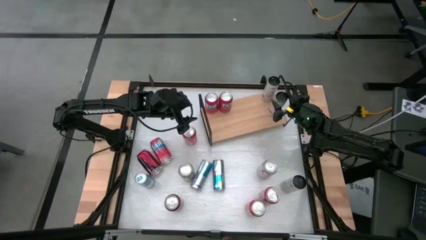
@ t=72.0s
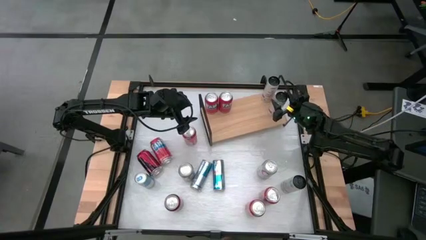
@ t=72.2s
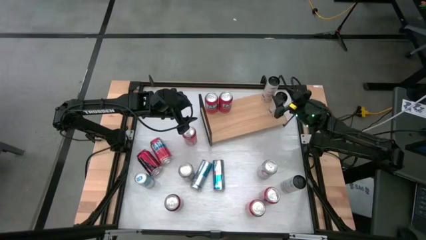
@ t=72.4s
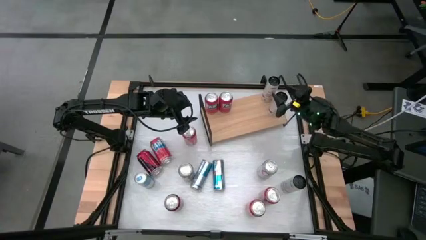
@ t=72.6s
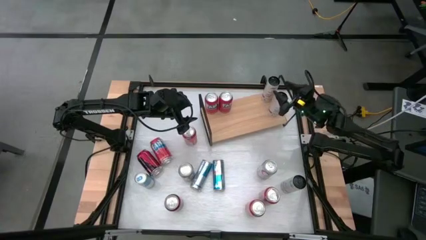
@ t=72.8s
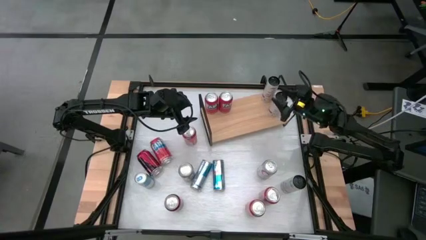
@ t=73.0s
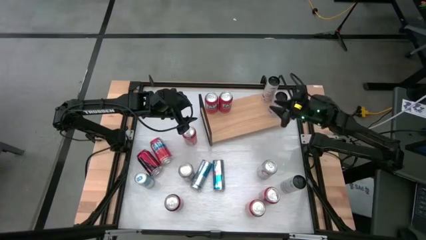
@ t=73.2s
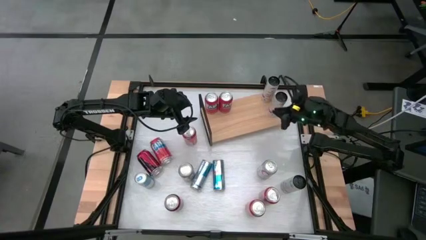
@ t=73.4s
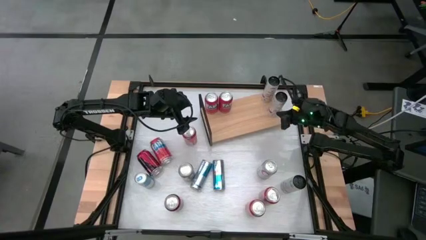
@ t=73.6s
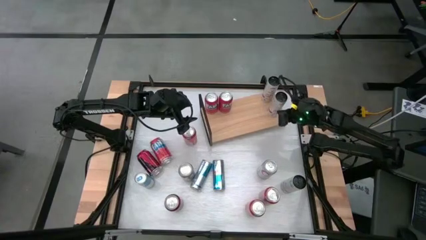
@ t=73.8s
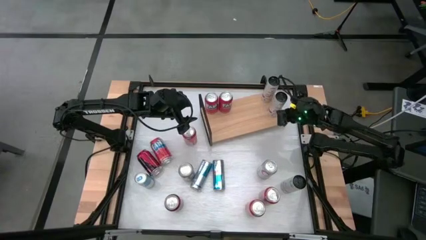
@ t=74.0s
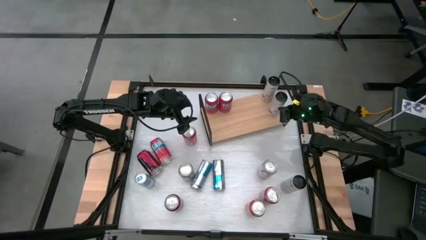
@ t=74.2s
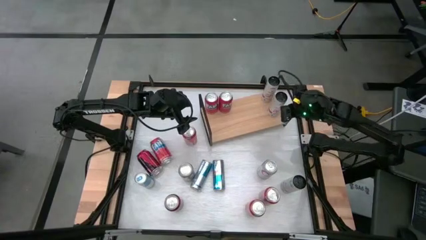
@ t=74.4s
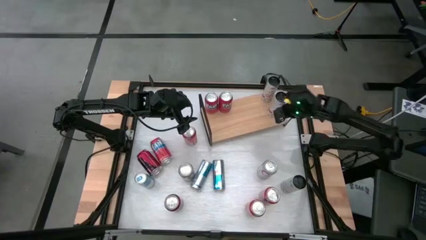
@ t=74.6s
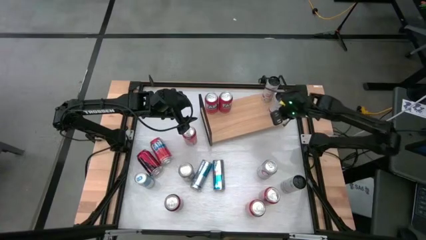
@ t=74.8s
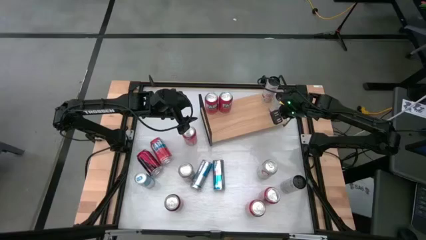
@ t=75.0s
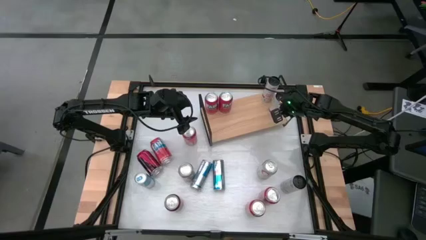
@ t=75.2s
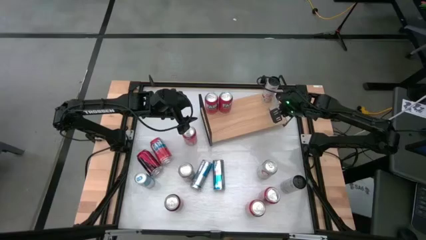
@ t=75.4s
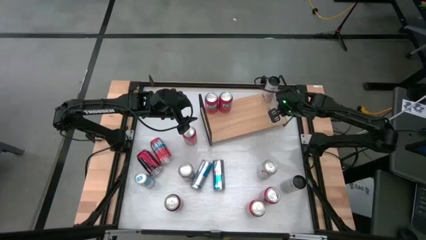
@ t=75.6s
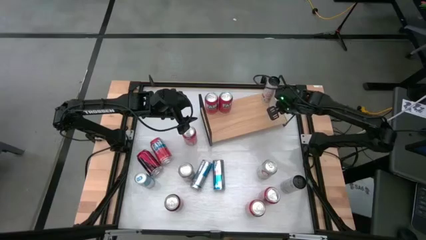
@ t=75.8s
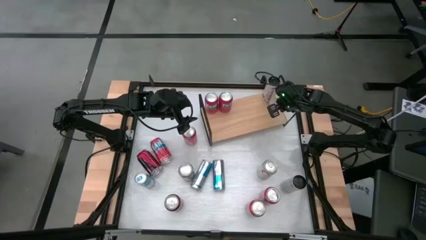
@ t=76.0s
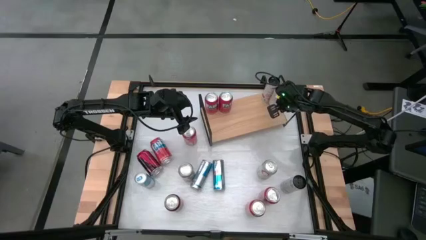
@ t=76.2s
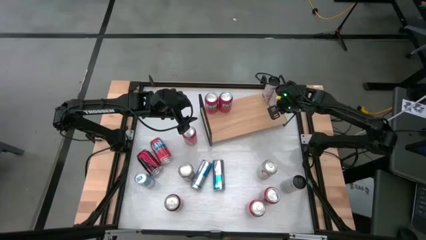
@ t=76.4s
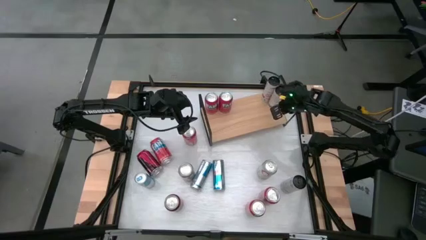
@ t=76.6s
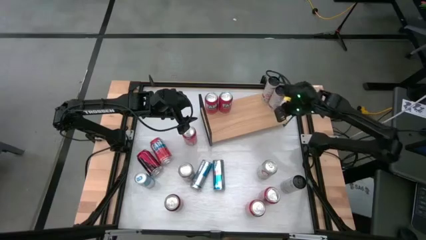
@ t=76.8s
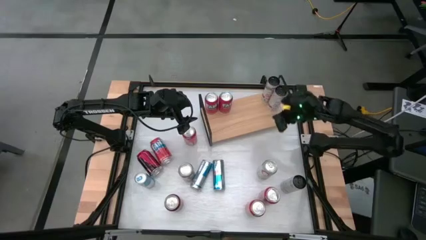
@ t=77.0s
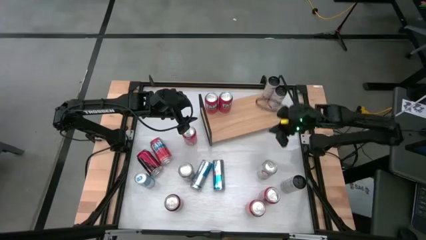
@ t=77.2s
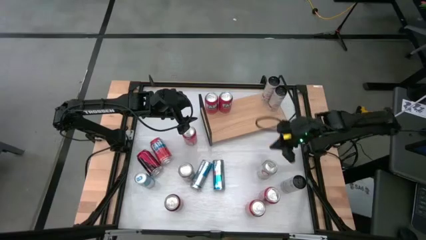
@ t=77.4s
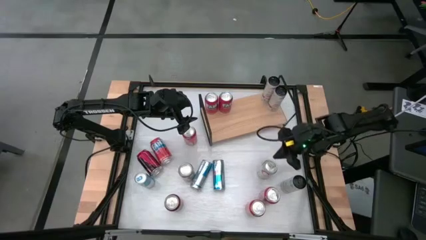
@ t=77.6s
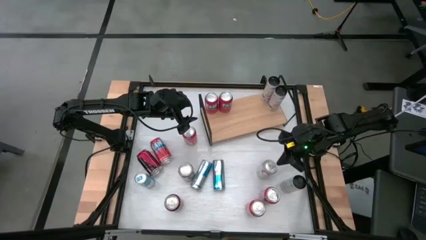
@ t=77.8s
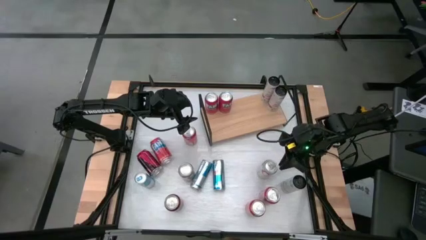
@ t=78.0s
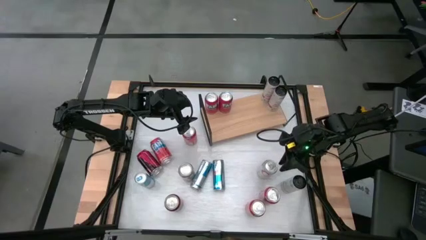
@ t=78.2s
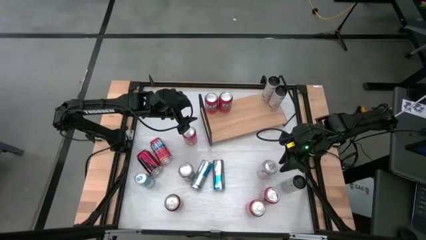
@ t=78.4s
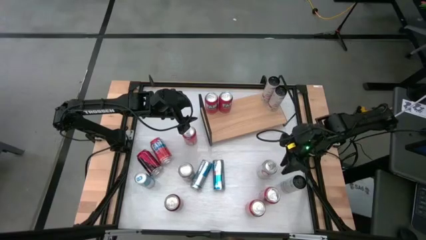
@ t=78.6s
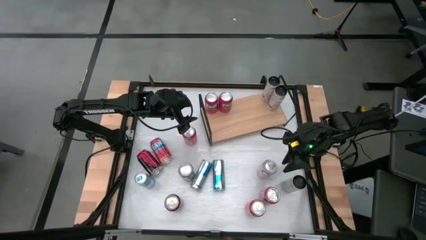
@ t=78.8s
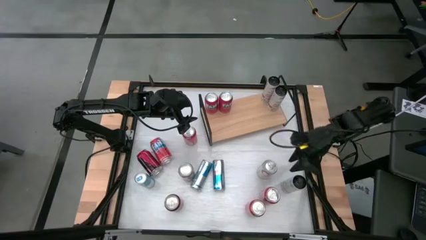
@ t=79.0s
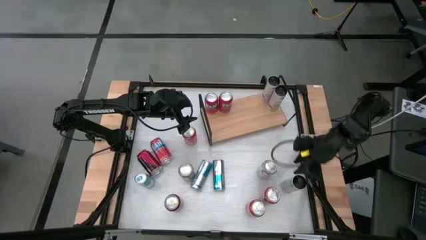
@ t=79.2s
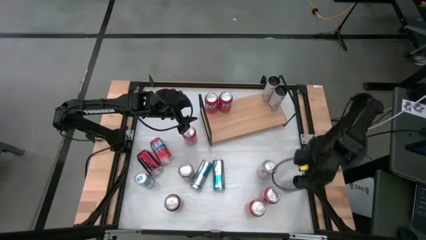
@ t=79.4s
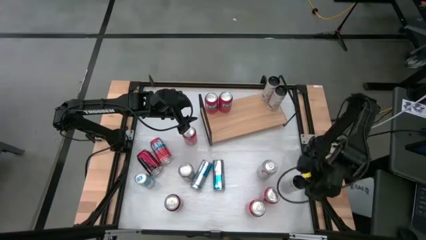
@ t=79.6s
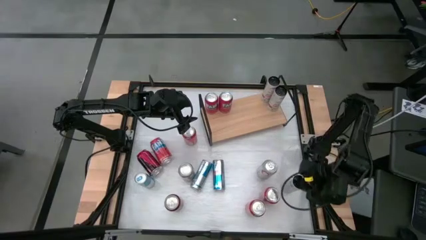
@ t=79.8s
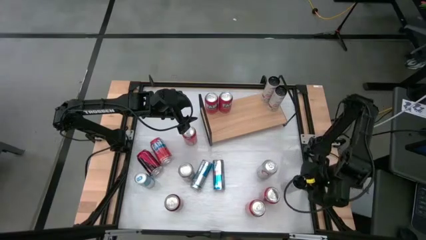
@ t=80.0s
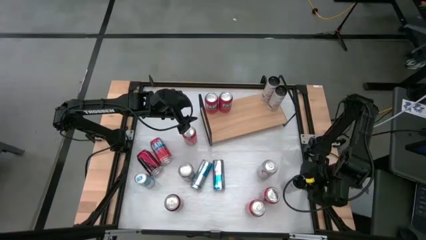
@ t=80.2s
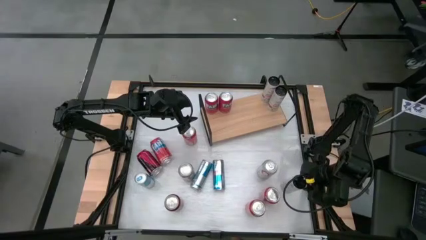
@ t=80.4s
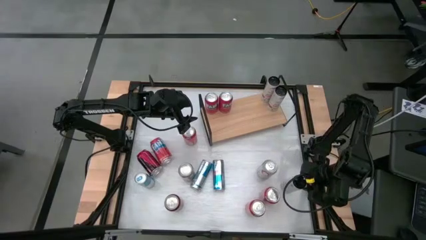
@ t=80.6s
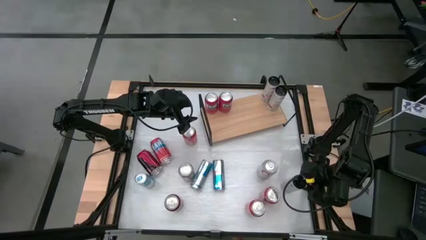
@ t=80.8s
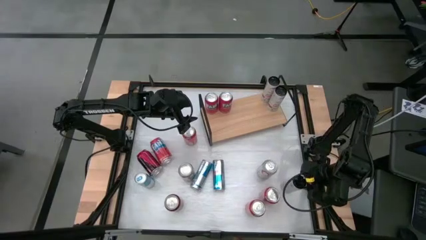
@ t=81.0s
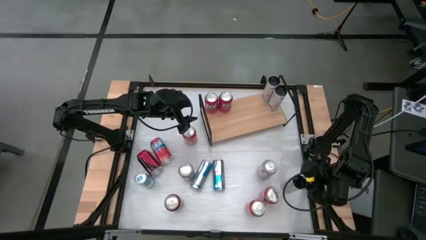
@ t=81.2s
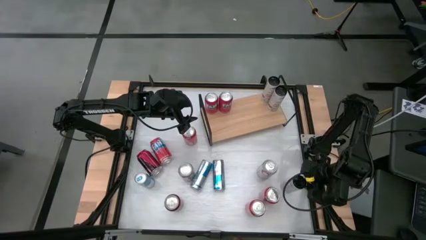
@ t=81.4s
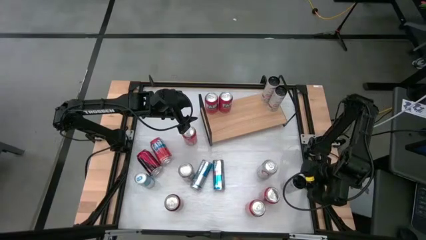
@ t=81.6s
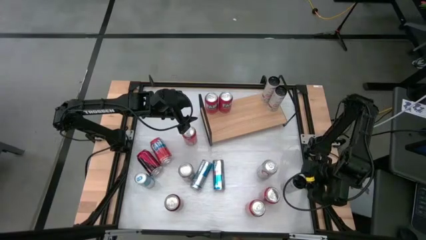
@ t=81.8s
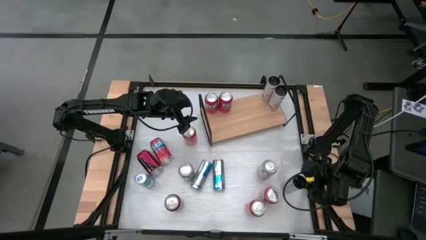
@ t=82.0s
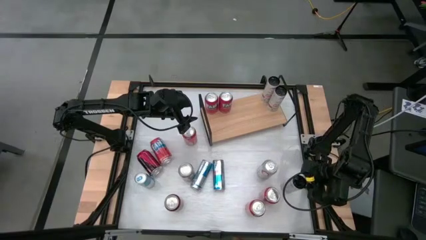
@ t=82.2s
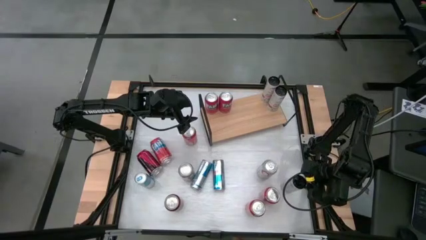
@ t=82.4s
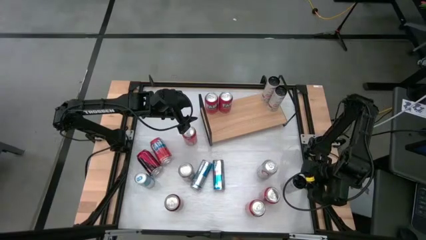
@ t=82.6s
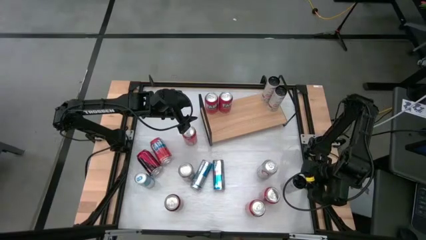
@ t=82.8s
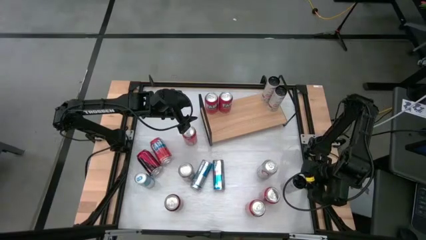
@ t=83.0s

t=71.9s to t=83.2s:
Task: Place canned beverage on shelf
Put the black soda can on the shelf
